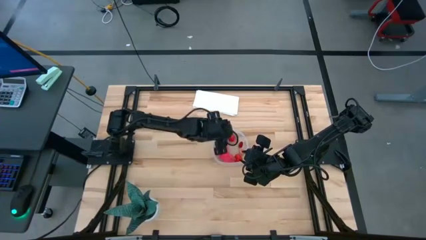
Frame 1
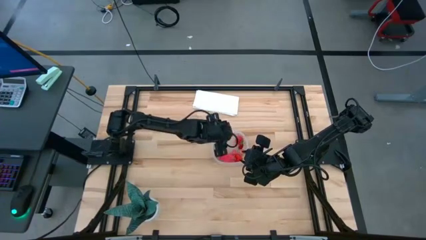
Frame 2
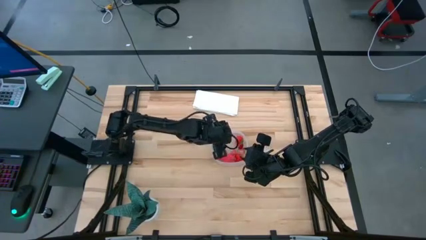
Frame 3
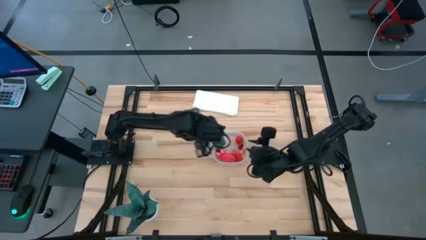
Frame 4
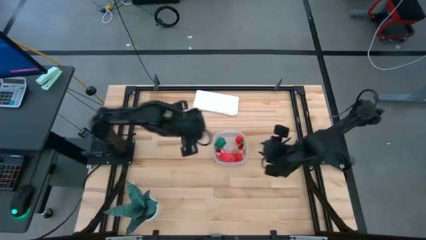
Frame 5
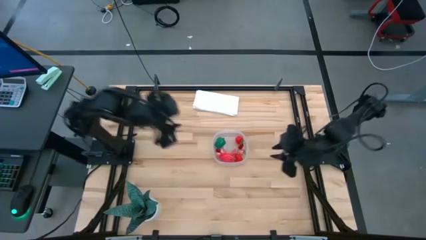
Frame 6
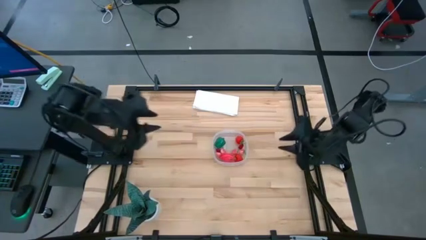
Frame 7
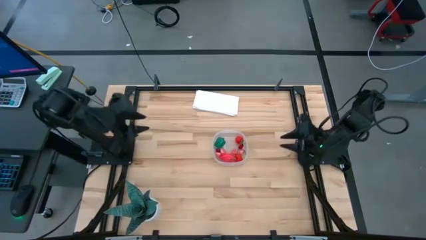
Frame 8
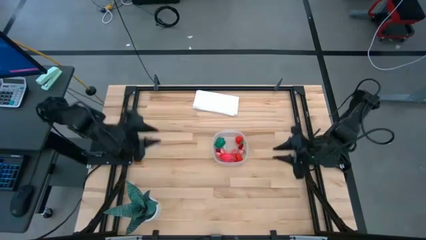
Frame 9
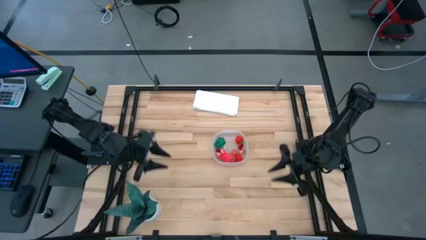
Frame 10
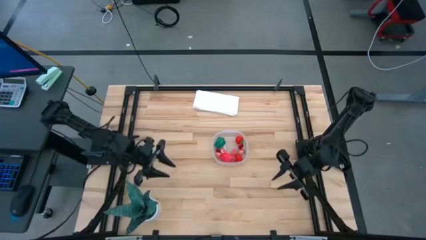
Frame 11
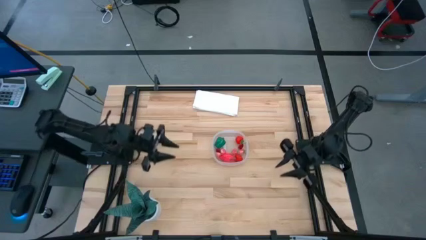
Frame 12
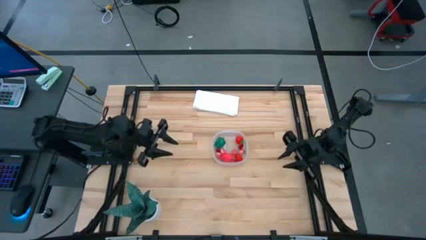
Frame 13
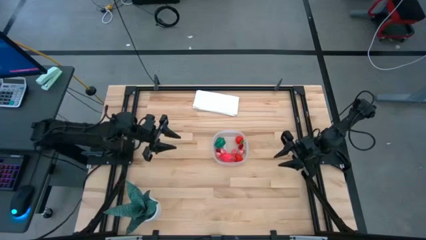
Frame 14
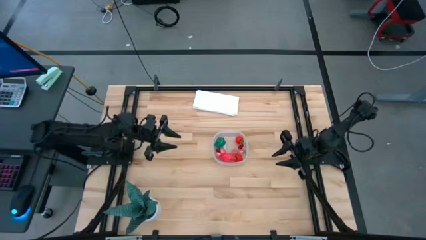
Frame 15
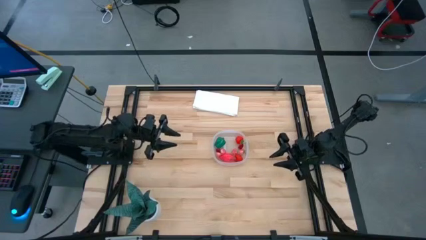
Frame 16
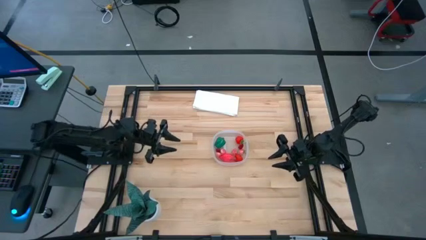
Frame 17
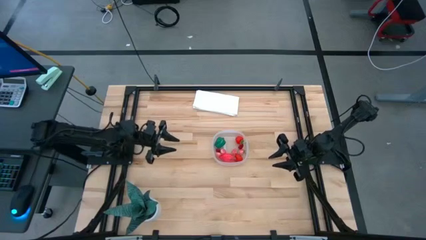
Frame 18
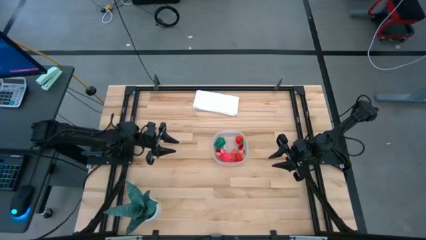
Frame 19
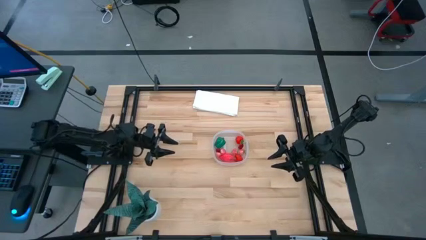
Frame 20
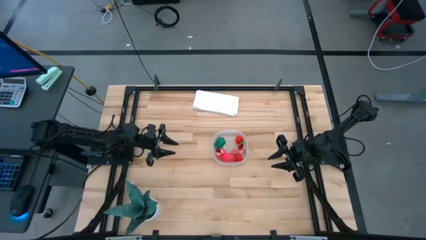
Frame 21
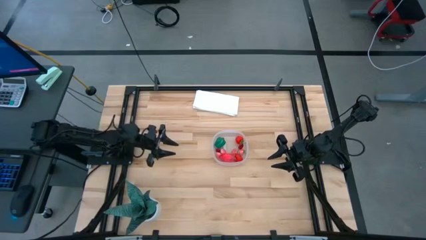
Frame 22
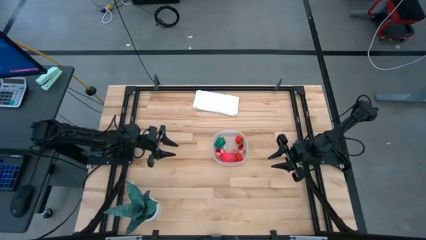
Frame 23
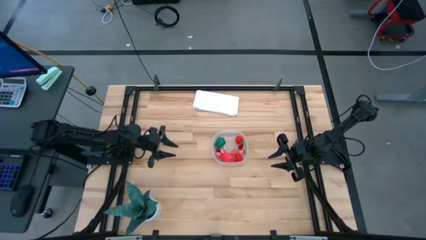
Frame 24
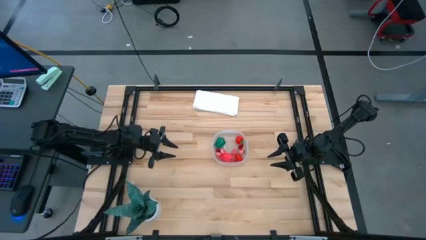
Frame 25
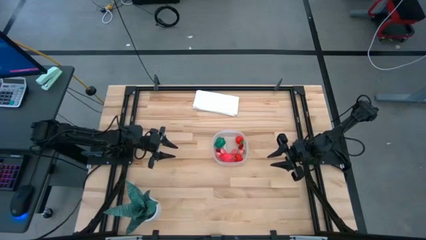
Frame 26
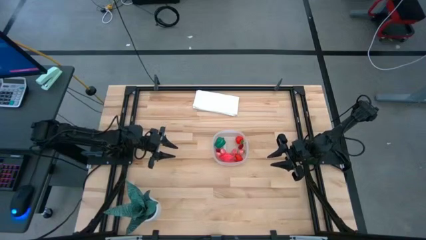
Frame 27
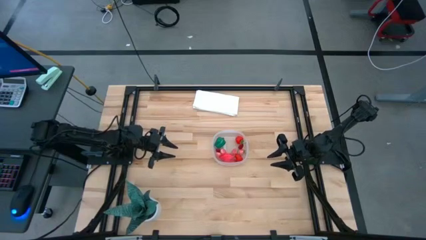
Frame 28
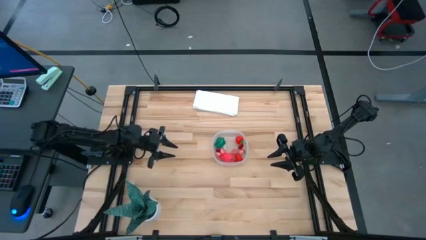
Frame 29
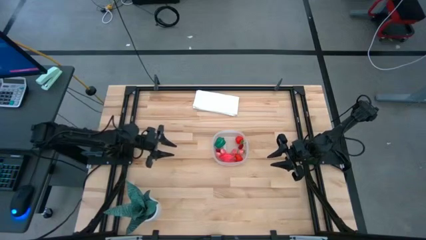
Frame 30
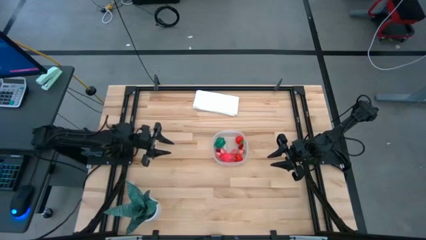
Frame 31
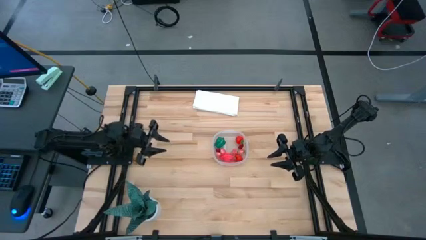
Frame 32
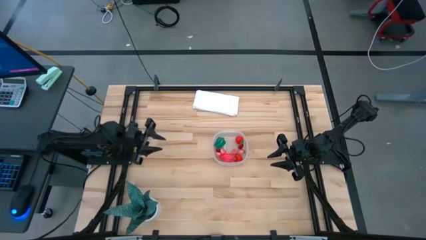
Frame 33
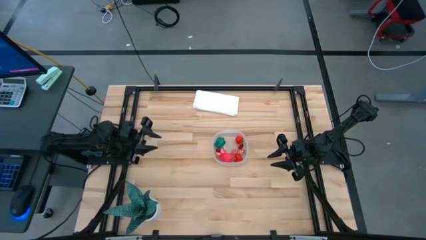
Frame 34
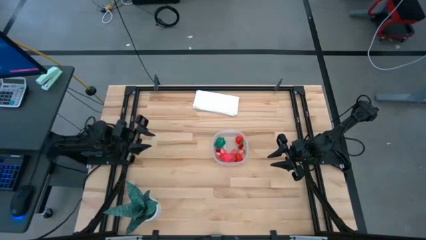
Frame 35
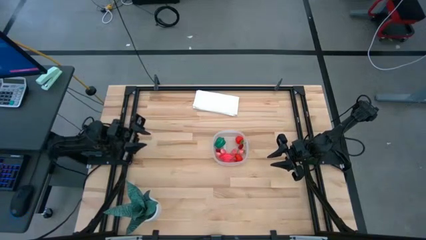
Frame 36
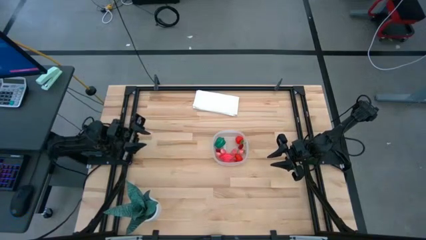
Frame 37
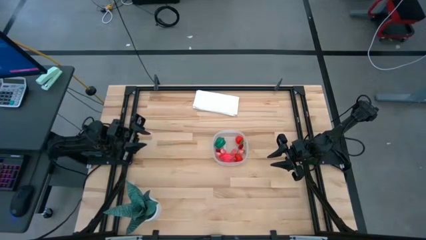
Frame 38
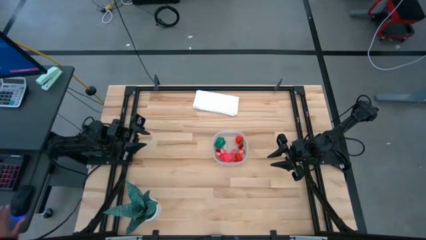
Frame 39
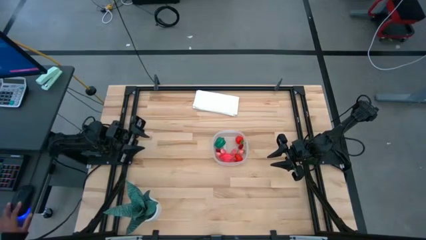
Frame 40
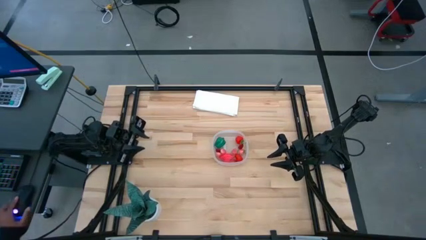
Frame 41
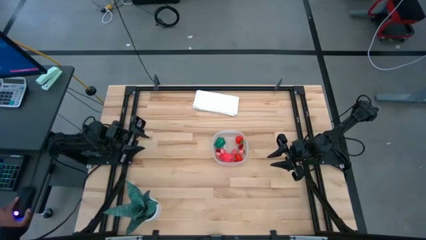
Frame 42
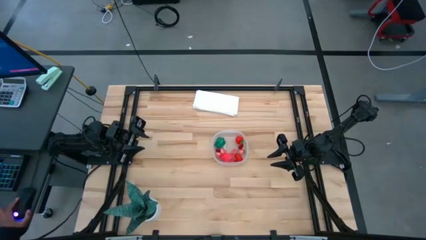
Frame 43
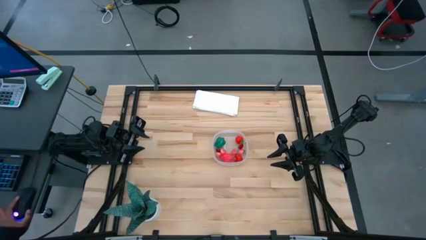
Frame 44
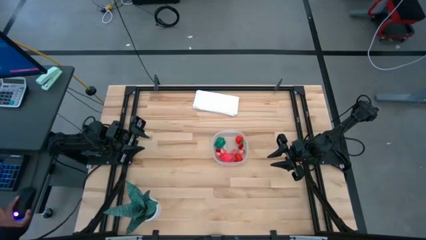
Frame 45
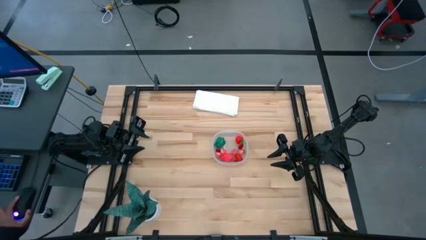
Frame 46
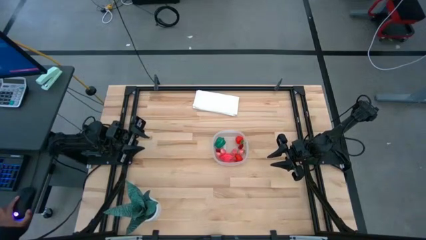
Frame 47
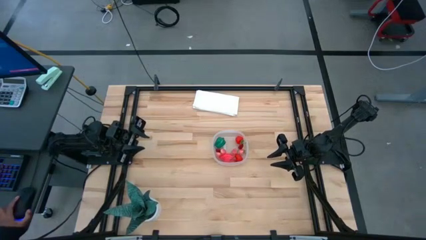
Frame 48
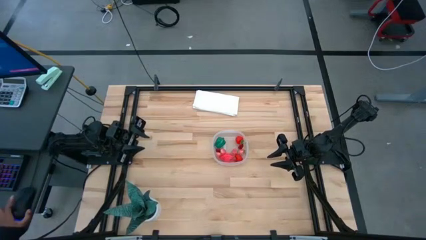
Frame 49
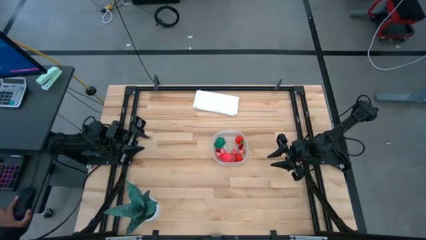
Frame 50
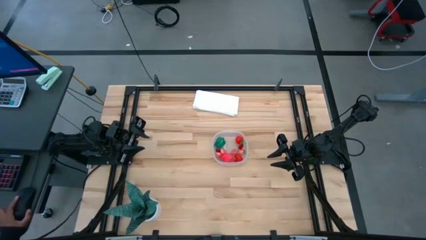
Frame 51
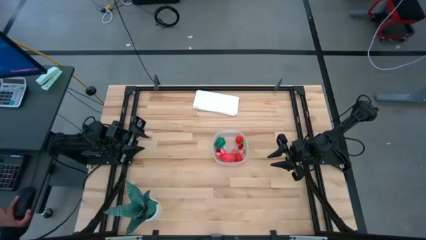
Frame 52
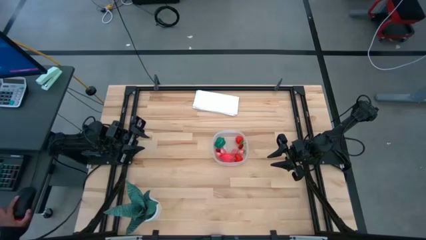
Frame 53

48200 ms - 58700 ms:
Task: Pick and placing Produce into tupperware
Return to Home Position

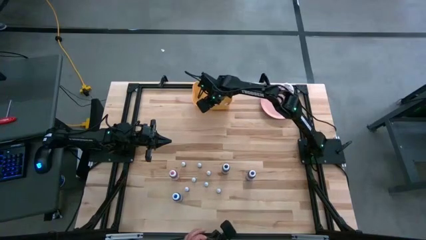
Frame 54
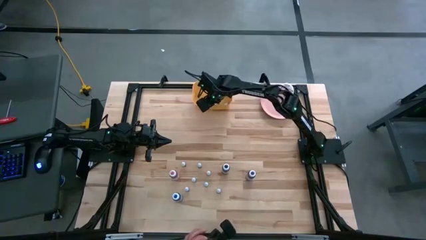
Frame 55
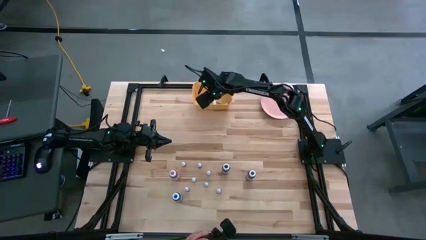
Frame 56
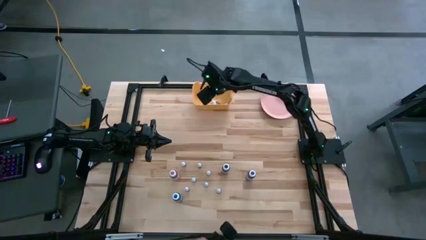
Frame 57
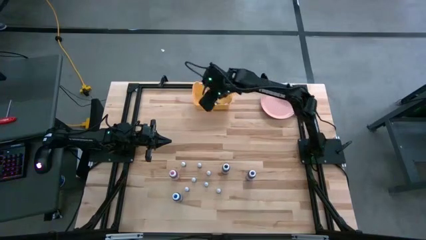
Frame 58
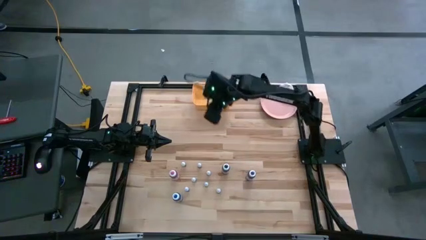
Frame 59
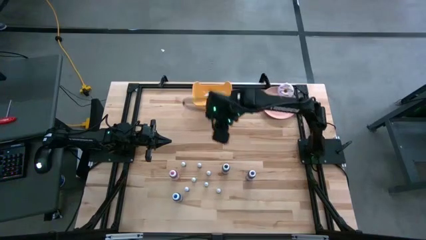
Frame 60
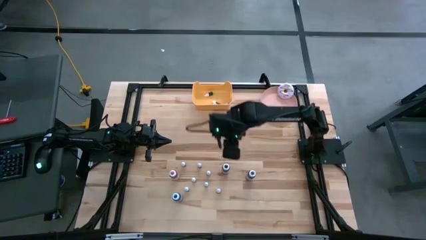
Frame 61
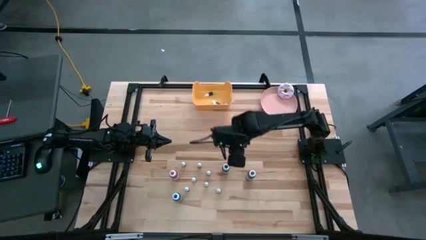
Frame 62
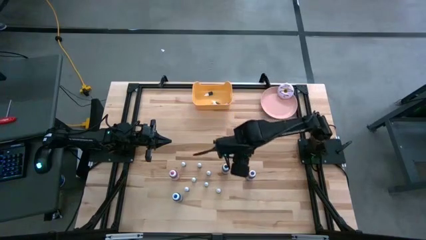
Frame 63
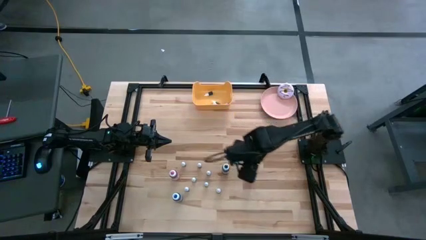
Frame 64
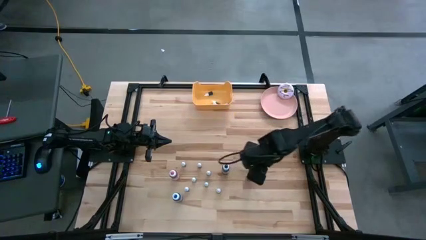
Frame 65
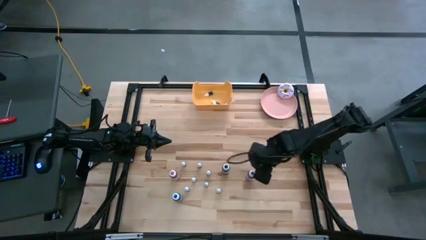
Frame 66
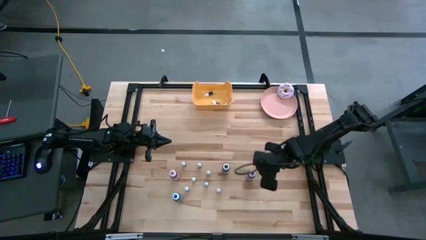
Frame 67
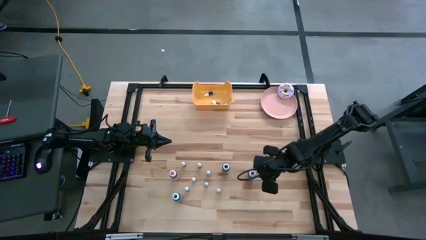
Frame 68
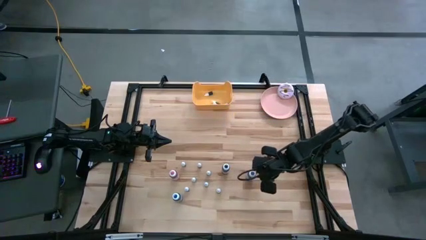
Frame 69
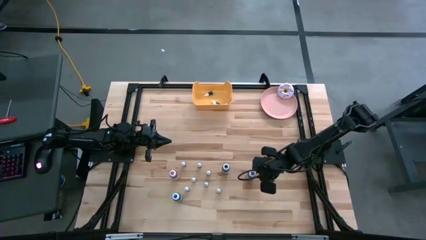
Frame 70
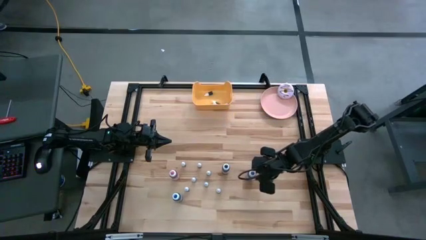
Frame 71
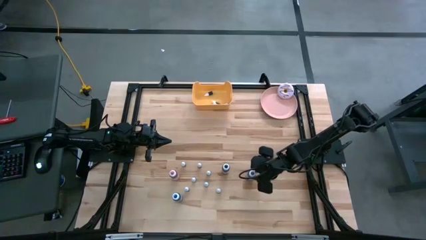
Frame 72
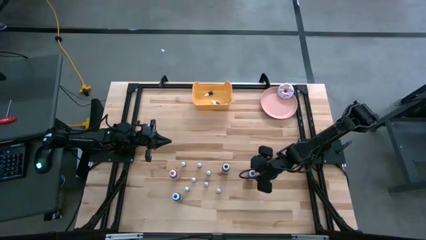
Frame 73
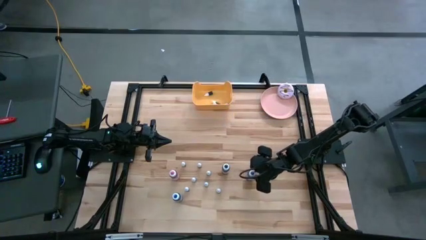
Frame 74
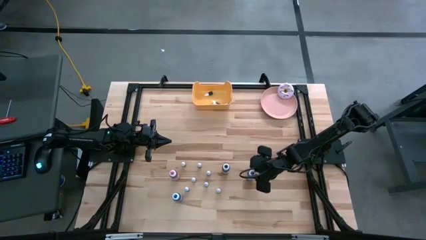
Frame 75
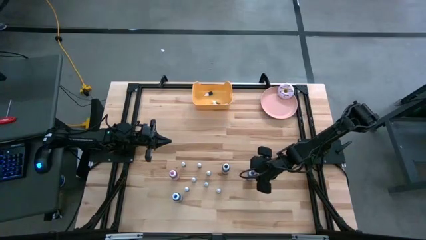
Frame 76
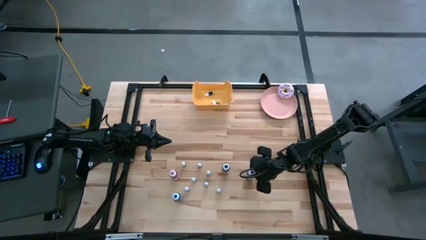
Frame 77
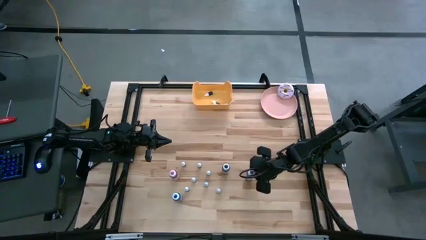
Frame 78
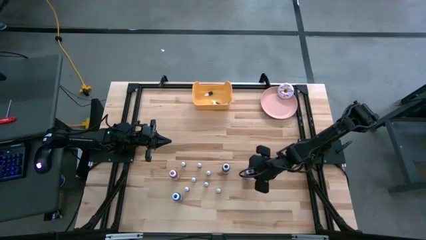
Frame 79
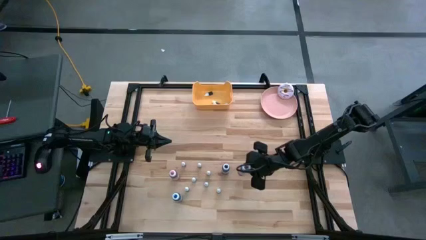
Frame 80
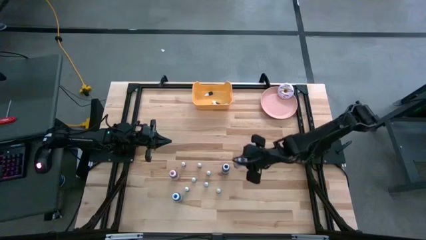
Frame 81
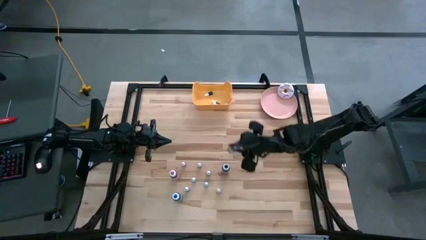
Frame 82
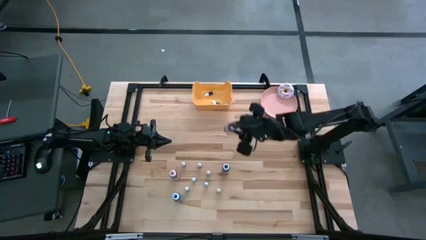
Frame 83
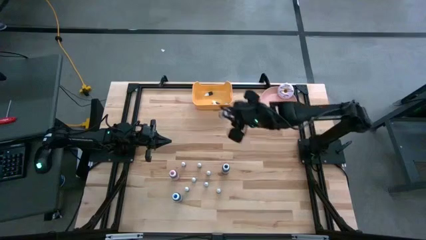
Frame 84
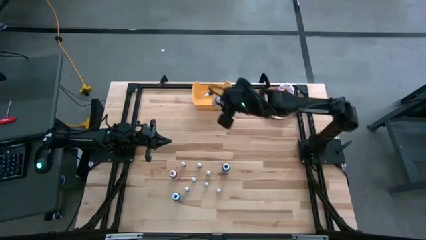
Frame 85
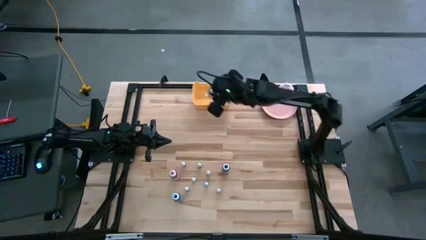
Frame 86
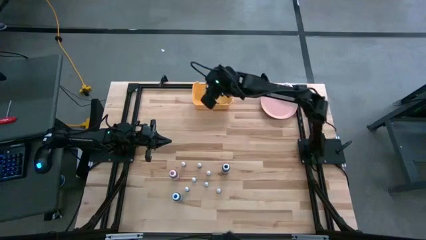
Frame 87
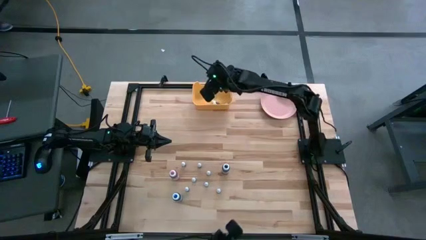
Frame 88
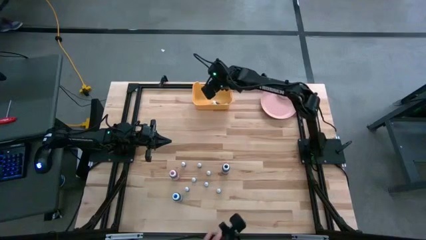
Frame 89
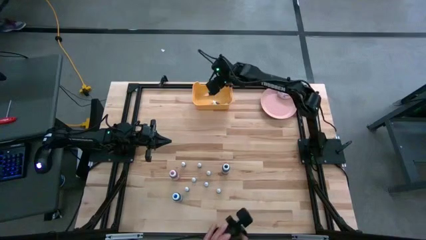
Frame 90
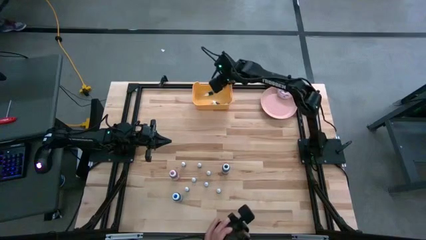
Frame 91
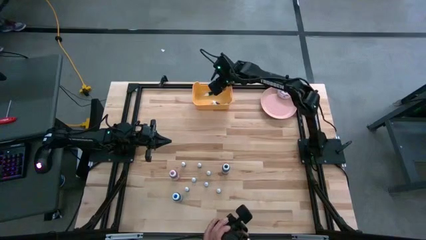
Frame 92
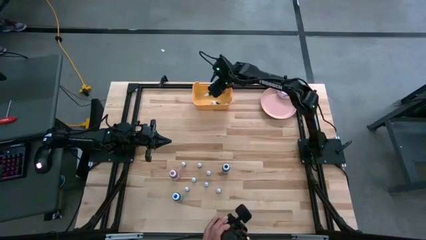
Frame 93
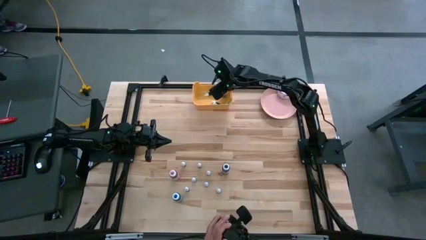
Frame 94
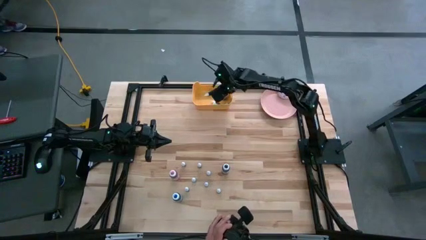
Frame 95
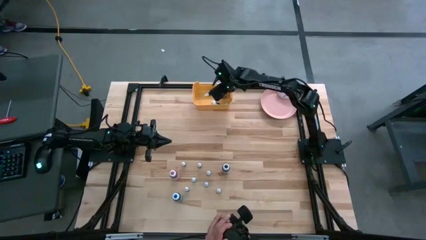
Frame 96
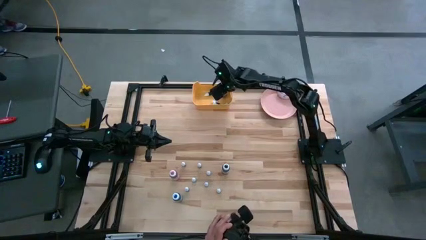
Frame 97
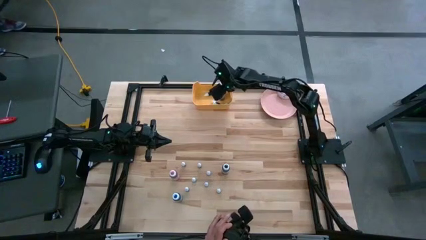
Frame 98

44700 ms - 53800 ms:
Task: Pick & Place food coloring
Put the big violet food coloring bottle into the yellow bin
